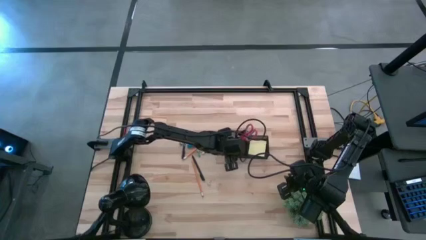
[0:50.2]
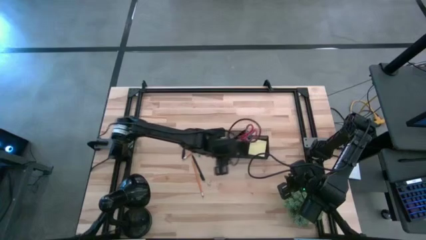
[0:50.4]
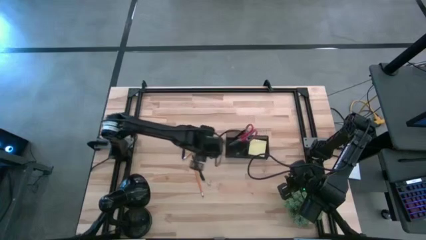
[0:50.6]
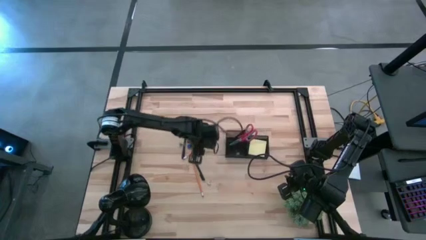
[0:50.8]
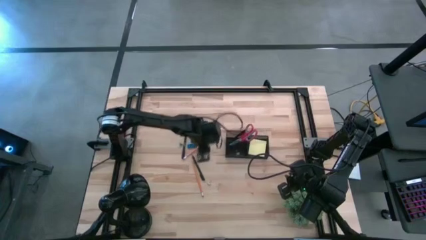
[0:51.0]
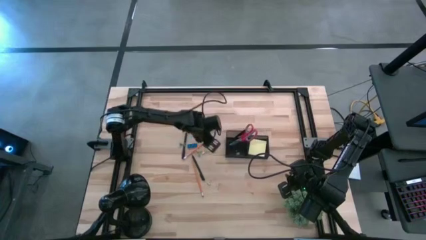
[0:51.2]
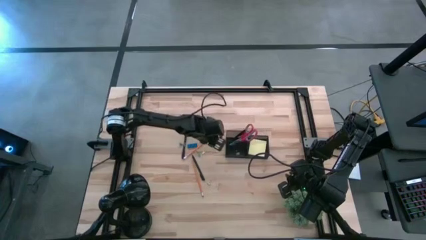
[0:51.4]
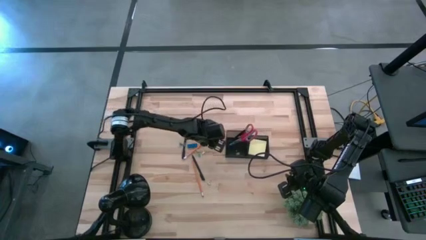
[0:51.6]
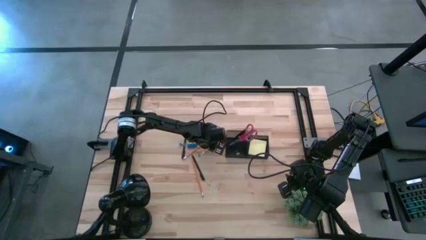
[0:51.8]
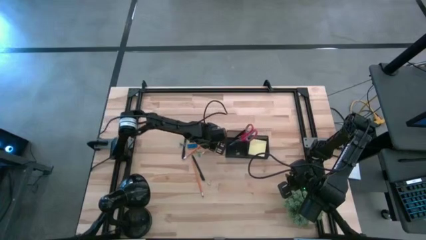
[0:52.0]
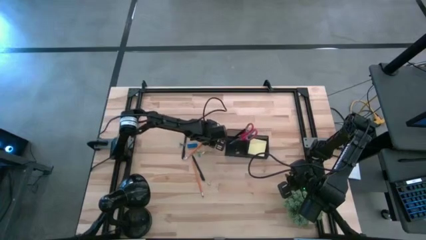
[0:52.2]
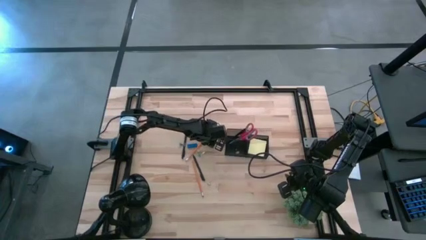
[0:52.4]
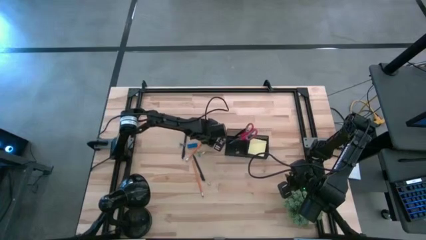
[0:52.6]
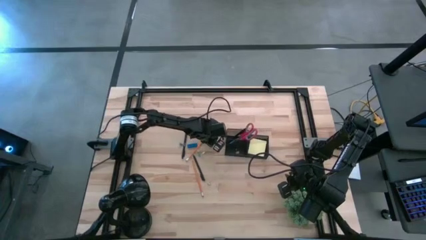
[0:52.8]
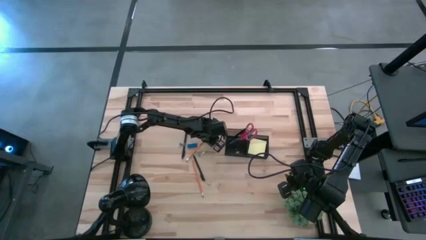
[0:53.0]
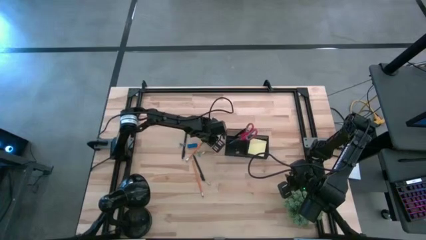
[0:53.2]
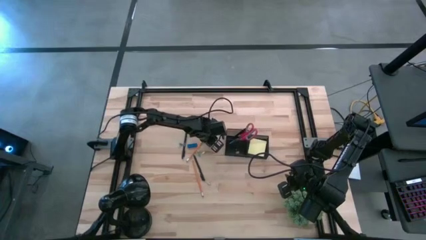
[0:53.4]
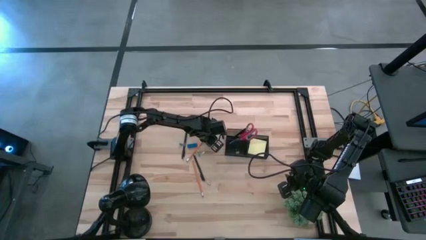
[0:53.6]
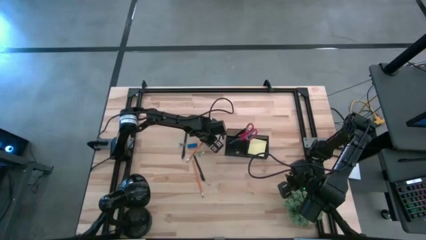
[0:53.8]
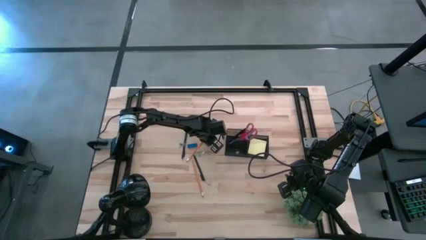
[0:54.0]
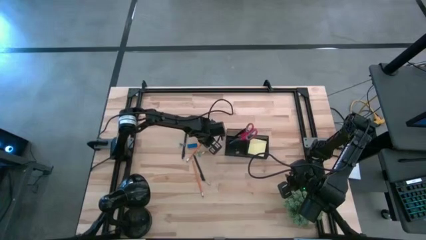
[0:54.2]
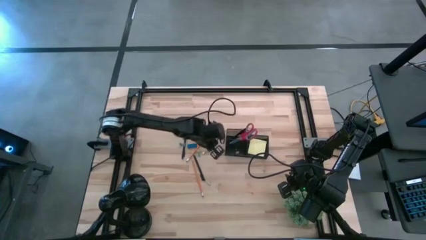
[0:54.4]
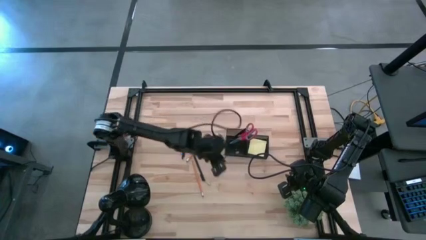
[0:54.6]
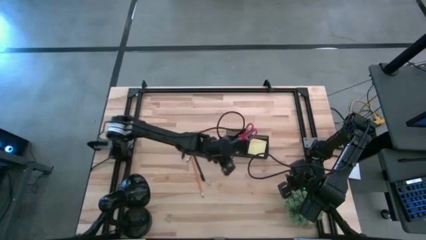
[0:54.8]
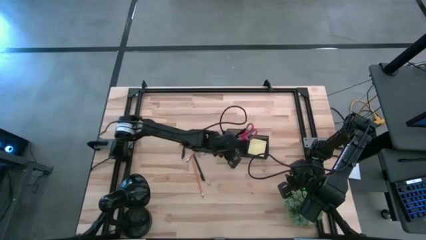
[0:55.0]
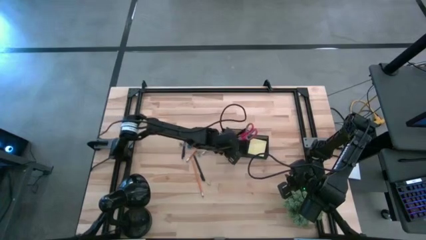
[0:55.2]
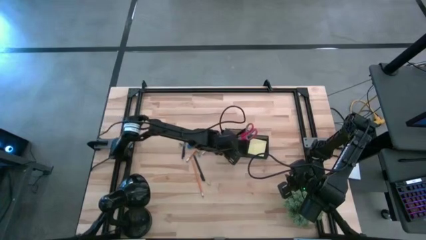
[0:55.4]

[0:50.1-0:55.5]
Task: Pick and place office supplies into organizer
Put the top blue binder clip into the desk organizer

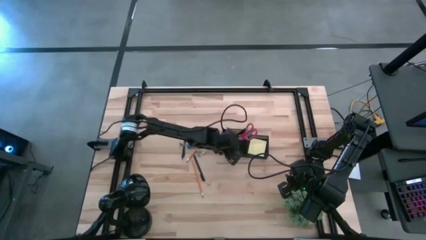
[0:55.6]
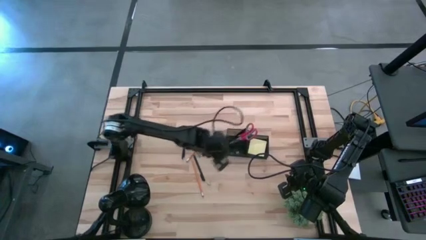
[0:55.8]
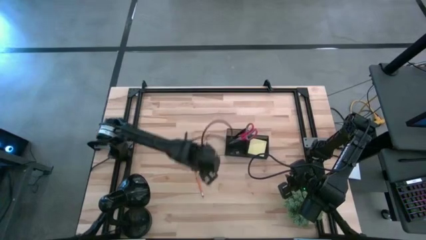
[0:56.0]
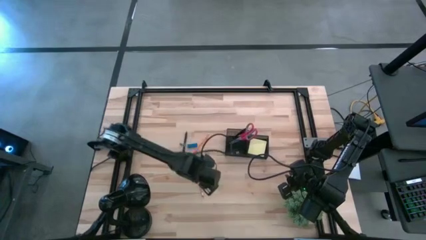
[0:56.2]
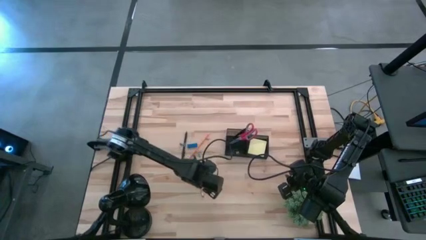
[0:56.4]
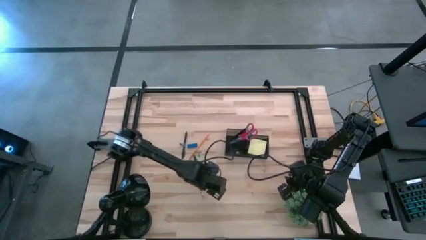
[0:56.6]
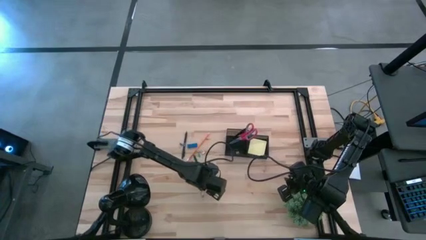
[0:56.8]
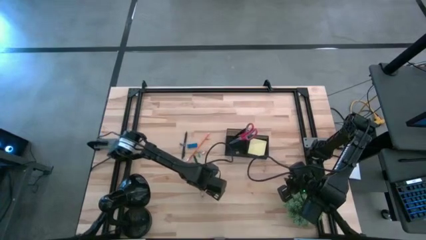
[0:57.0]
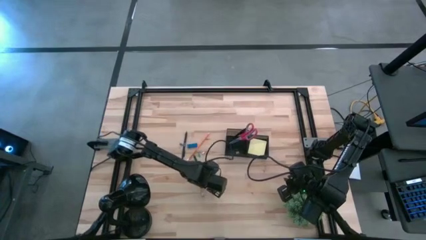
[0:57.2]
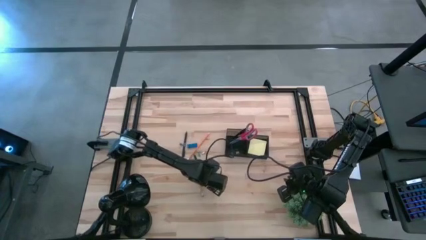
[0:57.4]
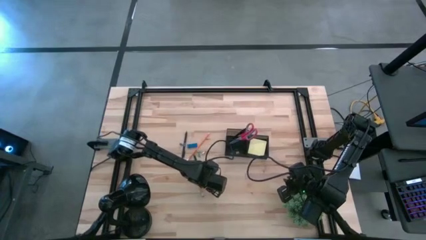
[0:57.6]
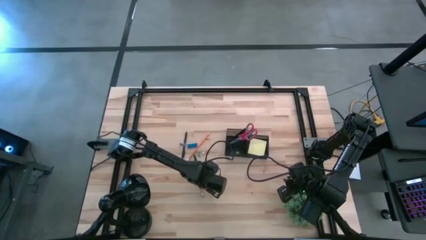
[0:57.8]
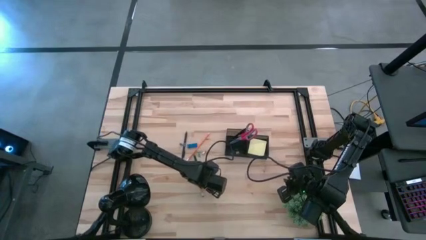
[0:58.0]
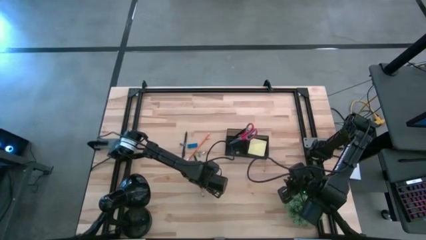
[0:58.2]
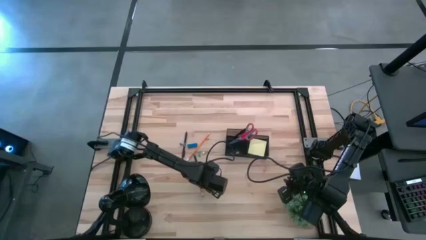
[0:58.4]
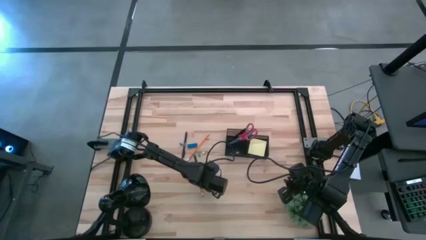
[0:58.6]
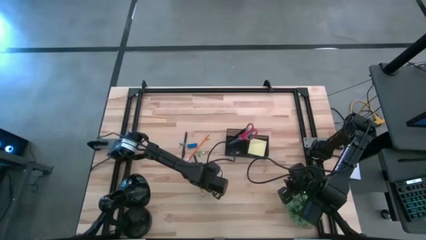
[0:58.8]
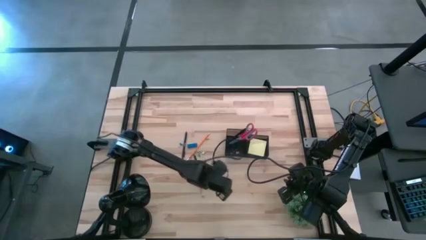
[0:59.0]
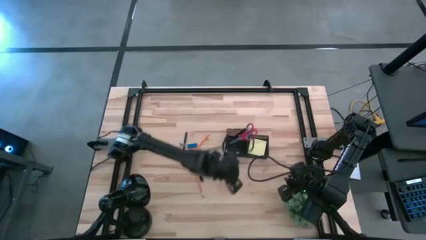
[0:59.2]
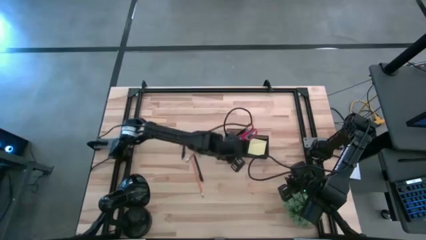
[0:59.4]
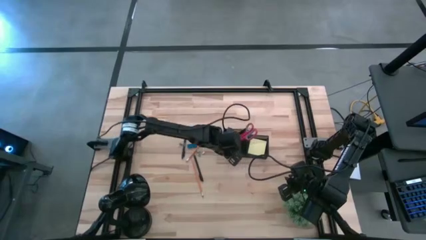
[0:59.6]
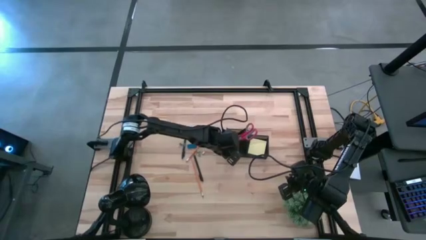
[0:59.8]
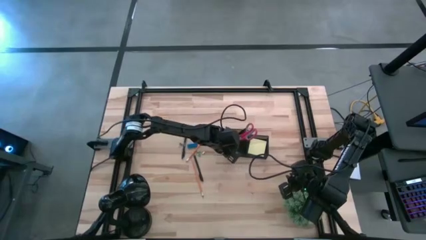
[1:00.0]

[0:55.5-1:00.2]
Put the bottom yellow binder clip into the desk organizer

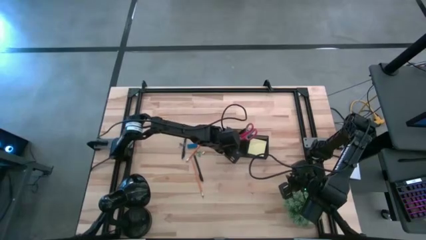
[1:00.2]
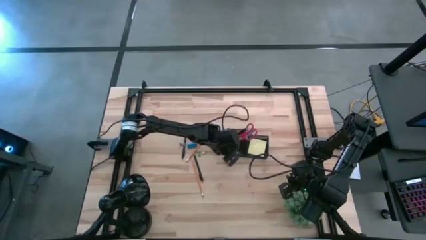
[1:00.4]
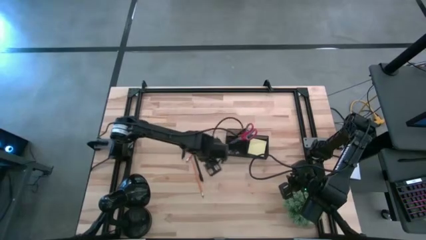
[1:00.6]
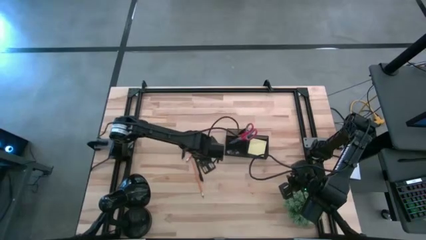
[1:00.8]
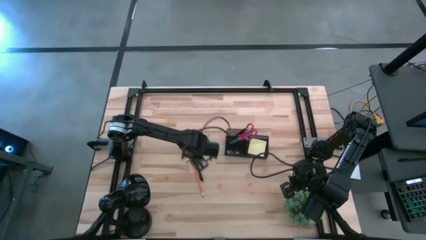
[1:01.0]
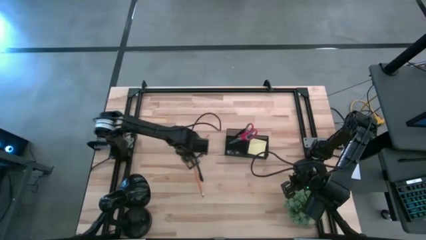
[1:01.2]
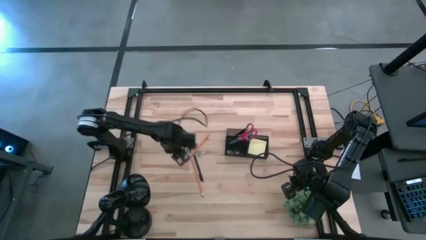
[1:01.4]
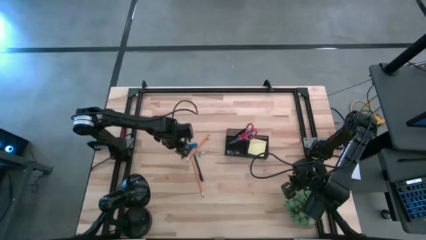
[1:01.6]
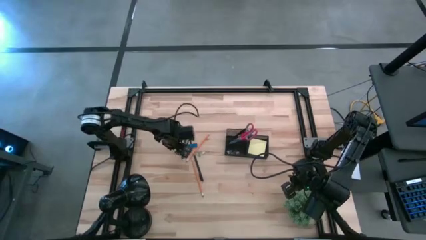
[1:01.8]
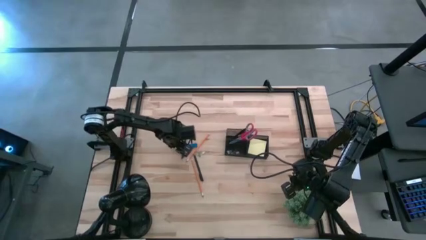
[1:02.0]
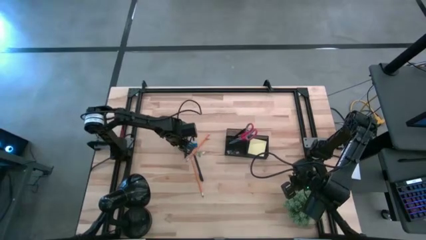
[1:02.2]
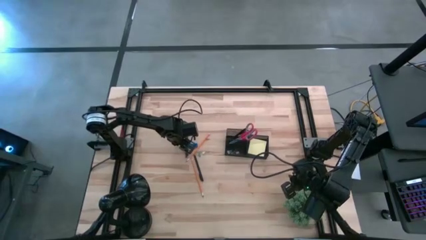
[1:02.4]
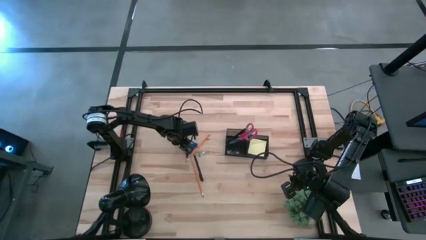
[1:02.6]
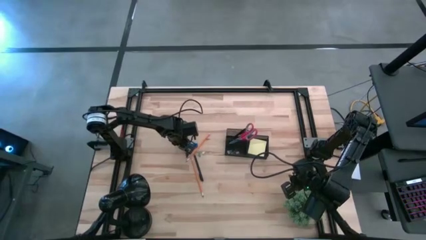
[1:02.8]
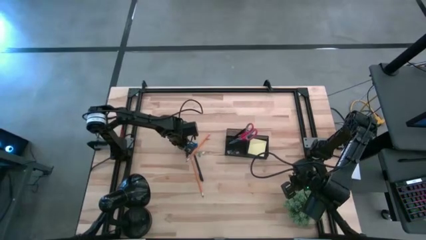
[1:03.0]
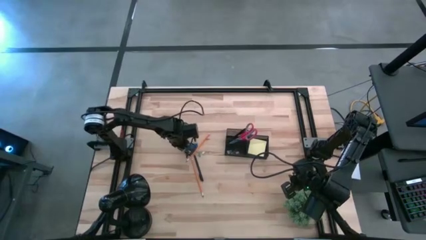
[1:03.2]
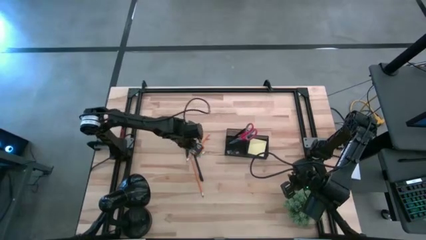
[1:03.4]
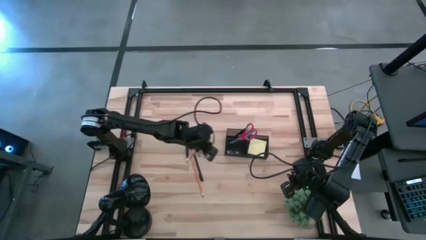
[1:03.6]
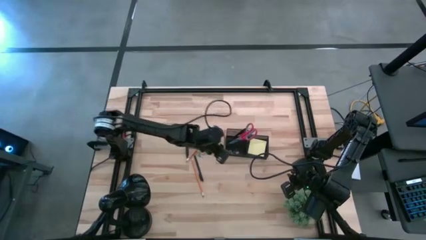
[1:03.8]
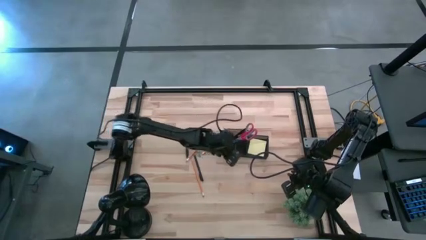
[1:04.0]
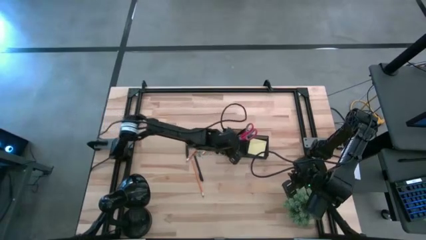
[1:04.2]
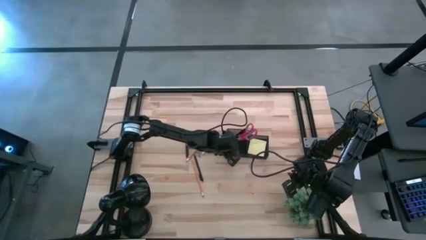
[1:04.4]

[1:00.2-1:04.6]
Put the left blue binder clip into the desk organizer
